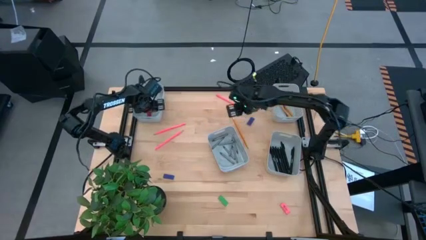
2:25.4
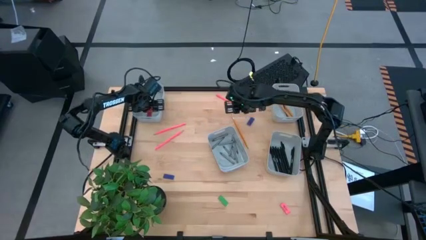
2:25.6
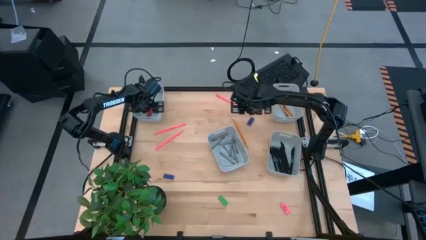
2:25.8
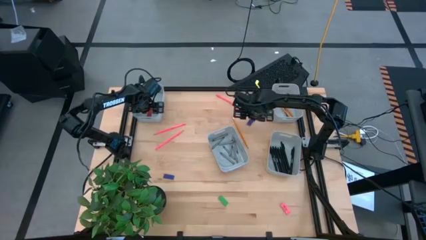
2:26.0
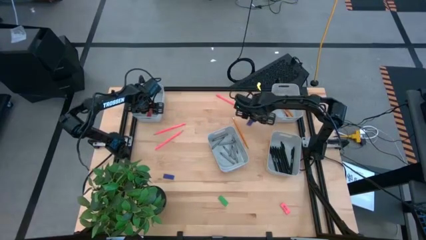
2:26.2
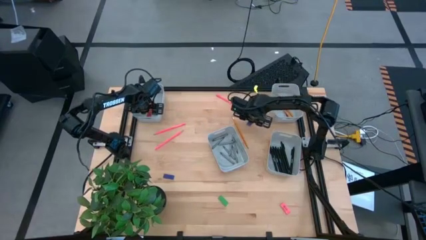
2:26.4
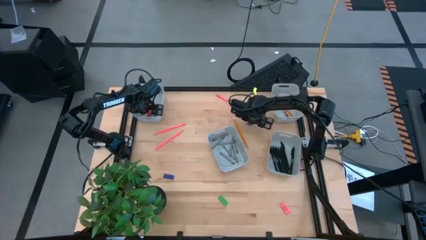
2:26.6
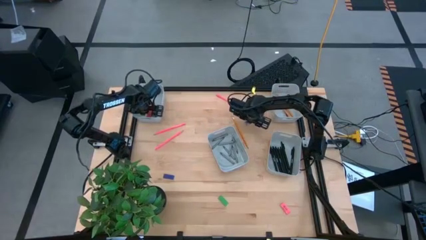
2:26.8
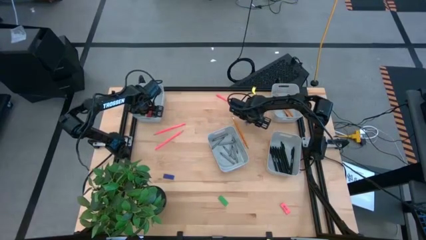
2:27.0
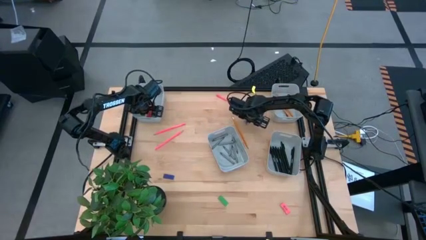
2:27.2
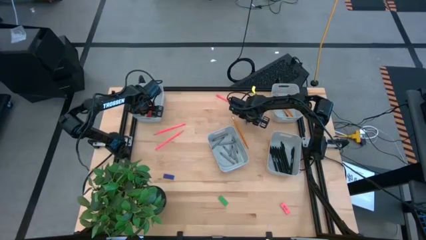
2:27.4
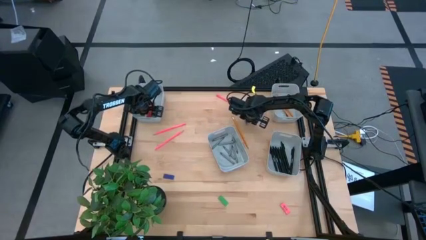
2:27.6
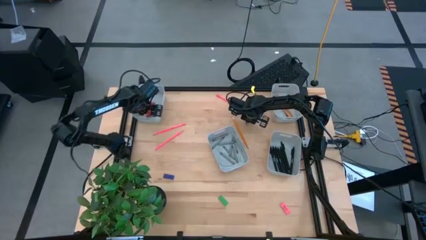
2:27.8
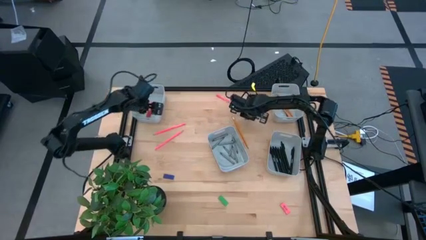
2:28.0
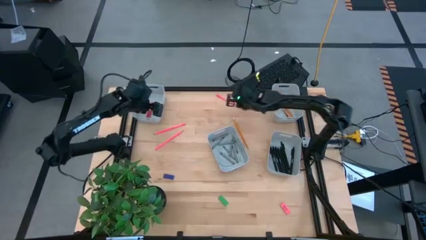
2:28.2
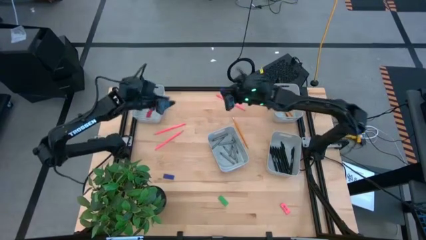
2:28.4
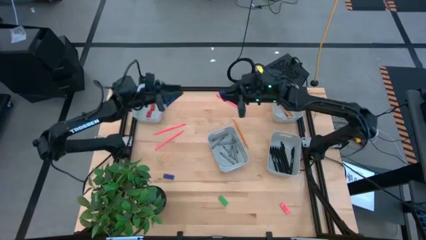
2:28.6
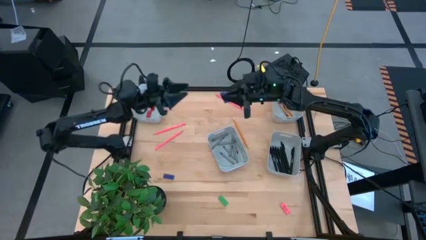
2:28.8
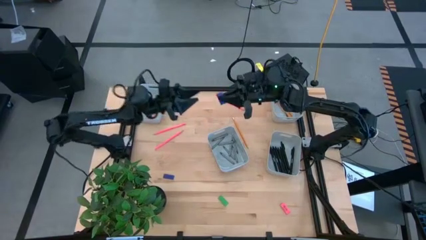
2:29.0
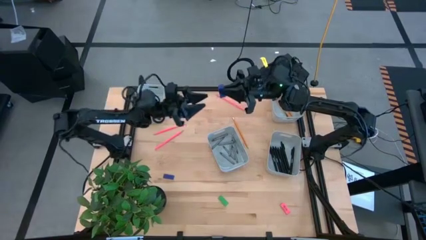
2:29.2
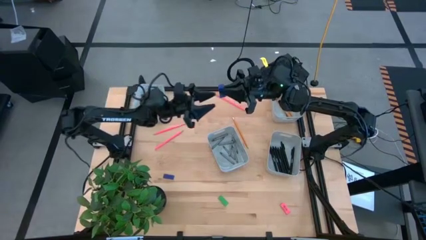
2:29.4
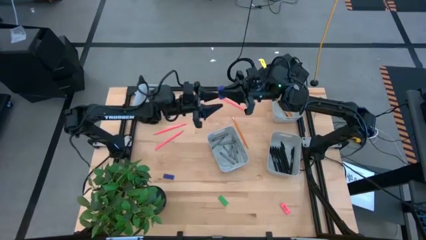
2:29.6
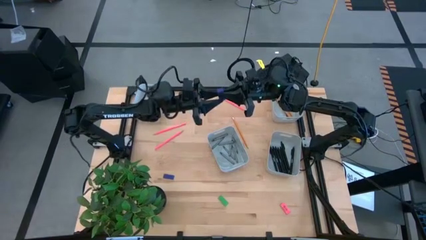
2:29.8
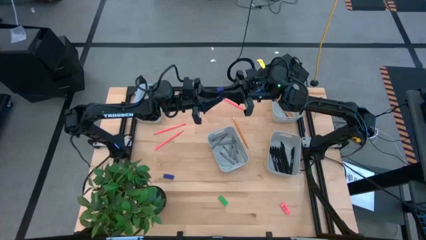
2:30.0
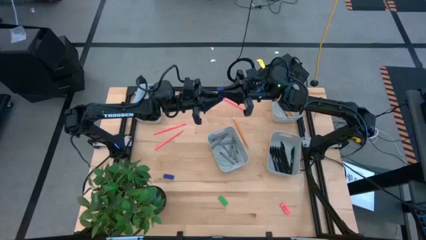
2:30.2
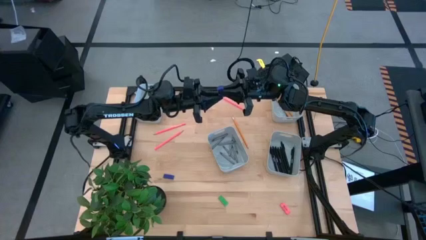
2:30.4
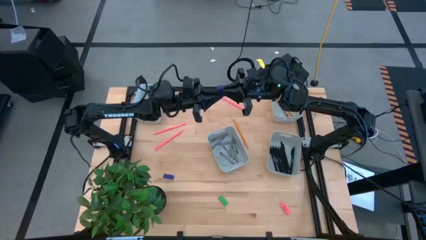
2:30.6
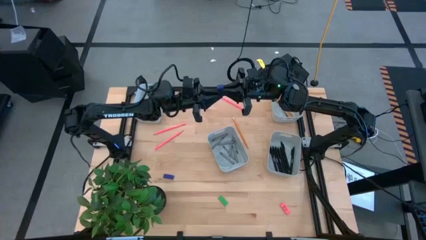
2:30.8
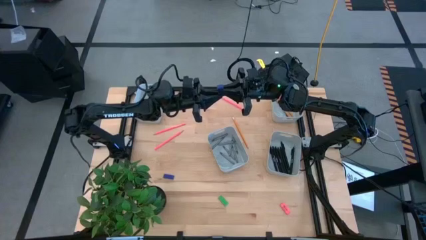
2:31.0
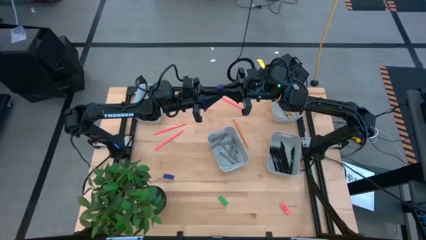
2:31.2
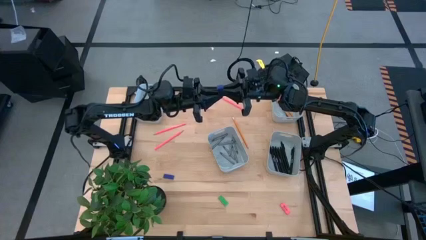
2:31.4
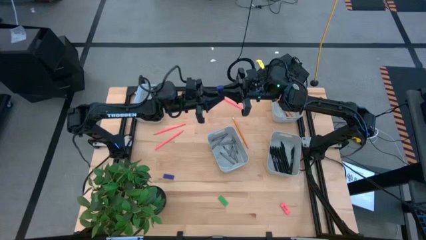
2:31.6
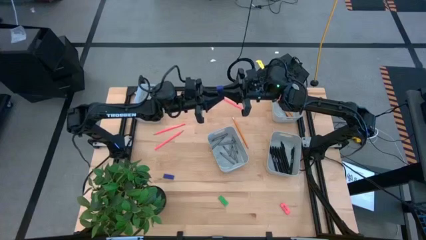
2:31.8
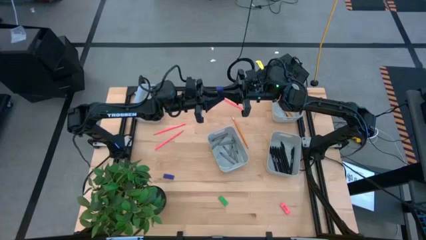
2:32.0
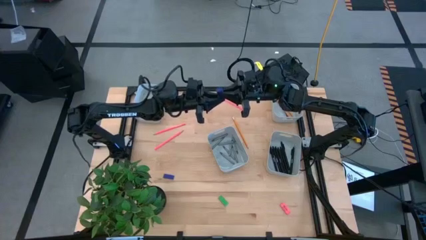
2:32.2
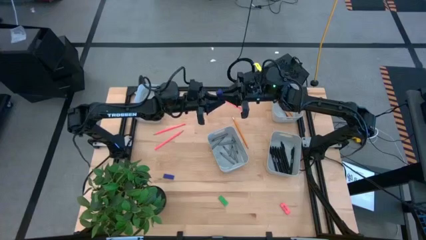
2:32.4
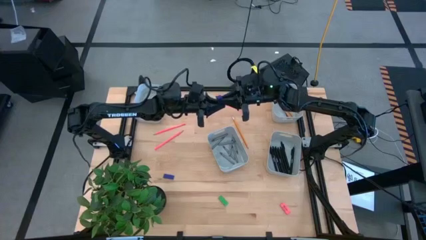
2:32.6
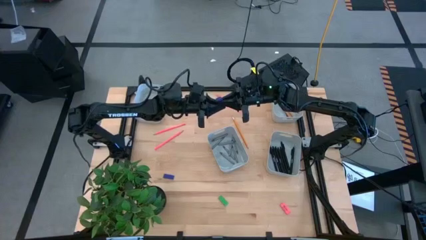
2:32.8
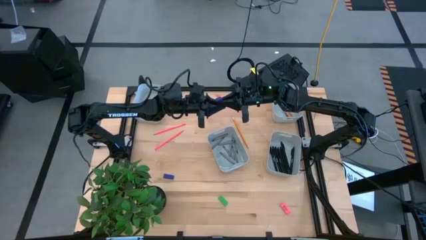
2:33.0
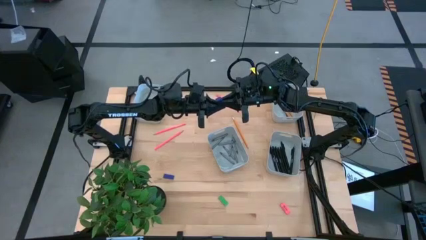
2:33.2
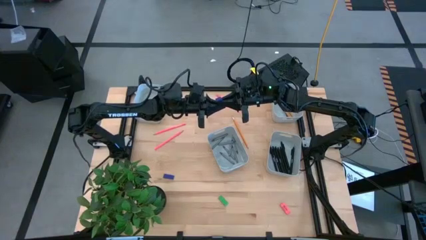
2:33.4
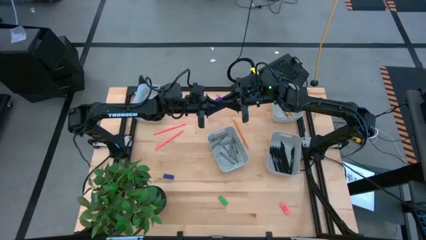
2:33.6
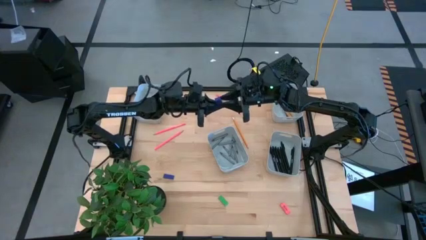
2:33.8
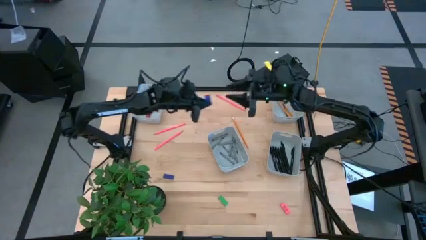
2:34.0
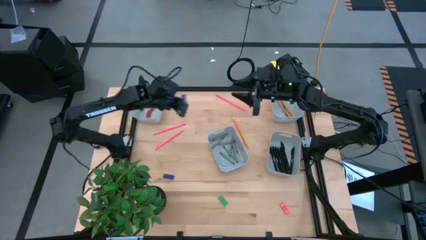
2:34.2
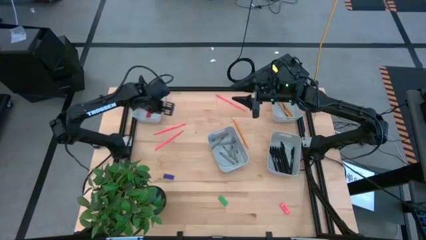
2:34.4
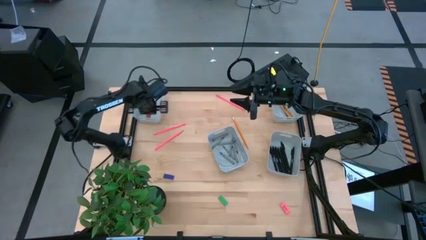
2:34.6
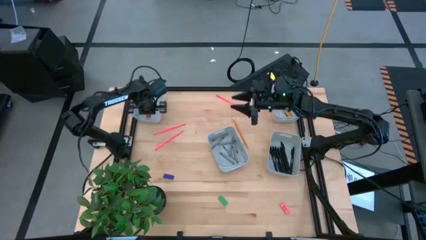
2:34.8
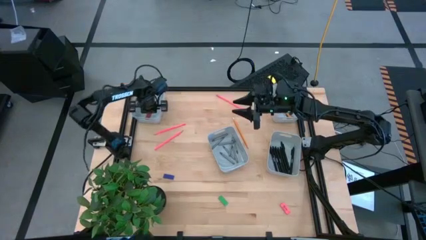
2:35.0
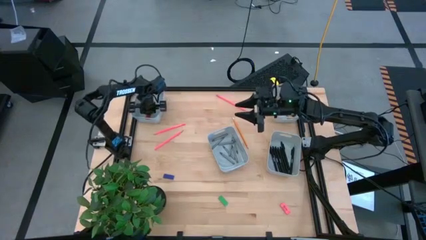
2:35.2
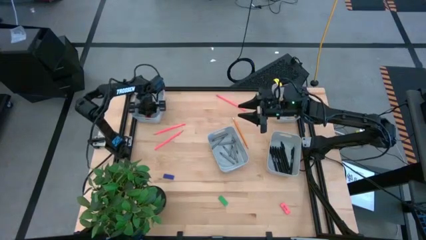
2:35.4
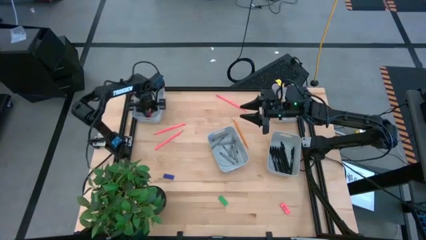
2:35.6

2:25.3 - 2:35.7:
Task: Sort crayons/erasers/pens/pencils in bins
Put the violet eraser into the top left gray bin

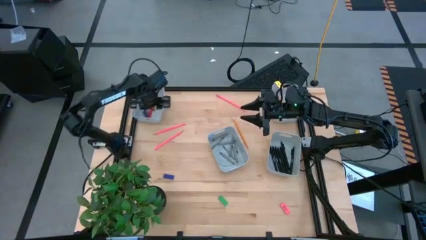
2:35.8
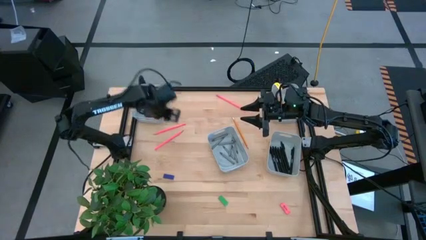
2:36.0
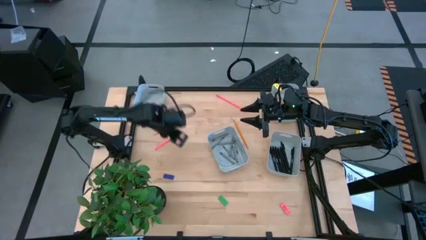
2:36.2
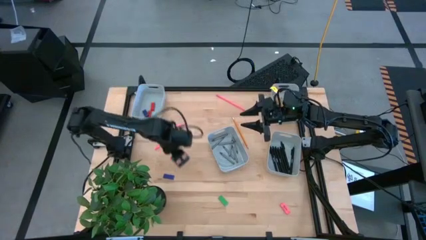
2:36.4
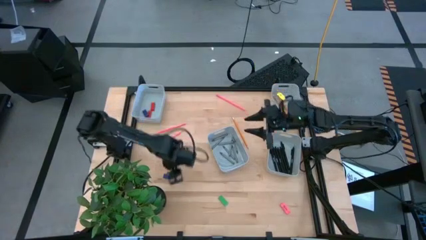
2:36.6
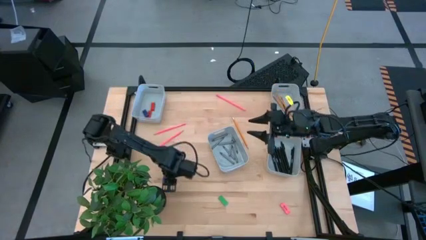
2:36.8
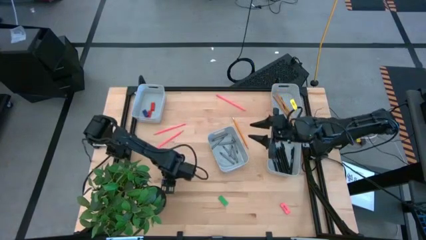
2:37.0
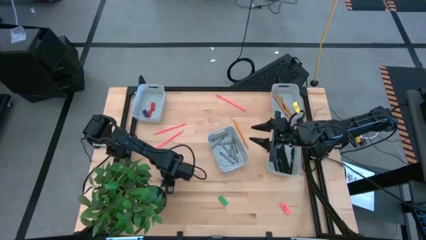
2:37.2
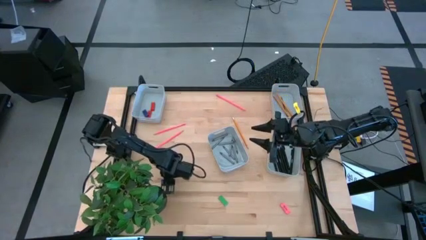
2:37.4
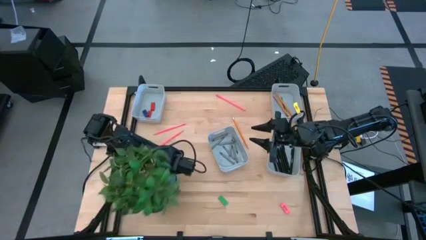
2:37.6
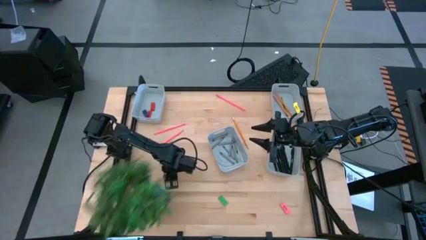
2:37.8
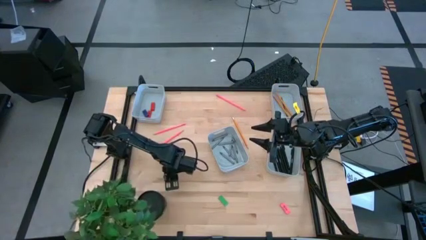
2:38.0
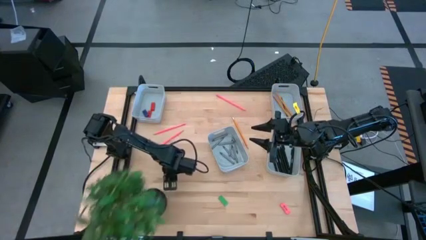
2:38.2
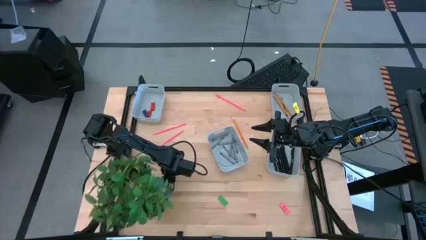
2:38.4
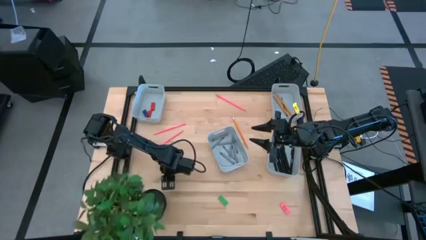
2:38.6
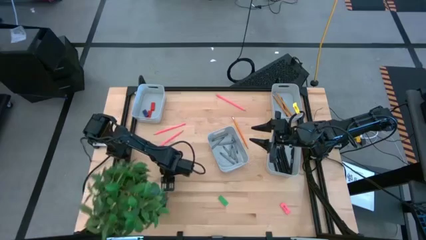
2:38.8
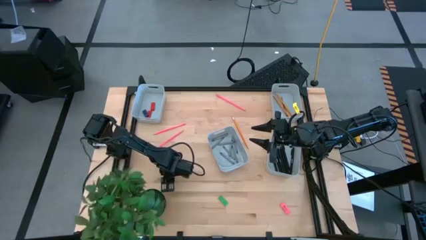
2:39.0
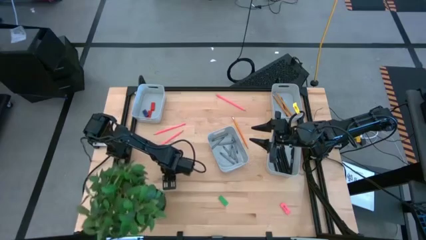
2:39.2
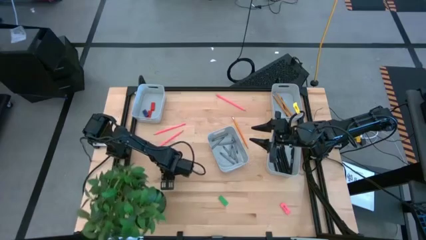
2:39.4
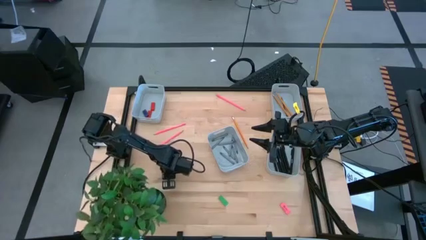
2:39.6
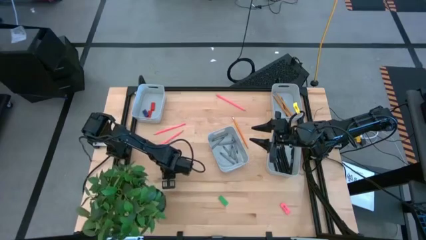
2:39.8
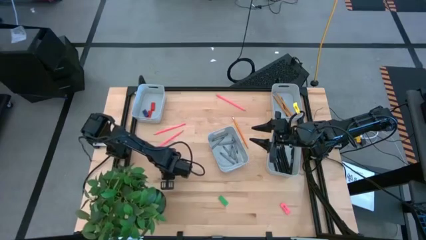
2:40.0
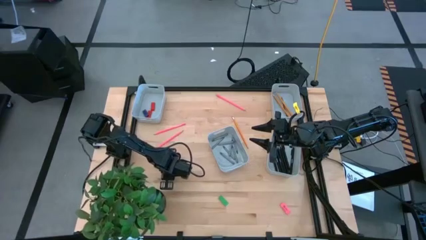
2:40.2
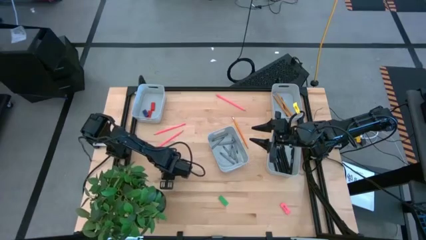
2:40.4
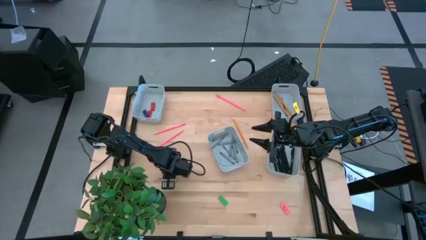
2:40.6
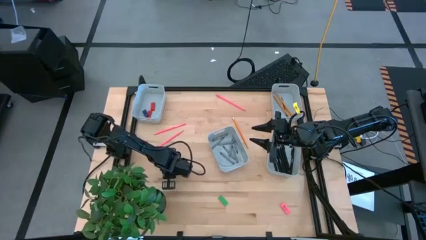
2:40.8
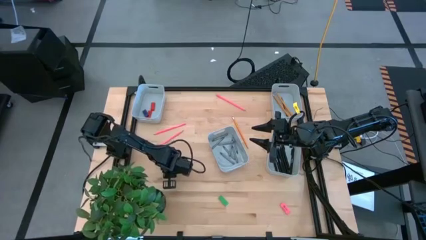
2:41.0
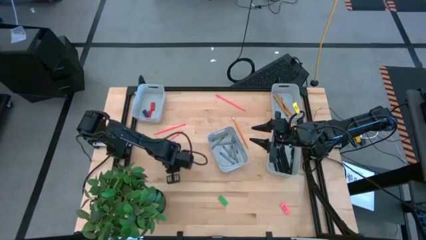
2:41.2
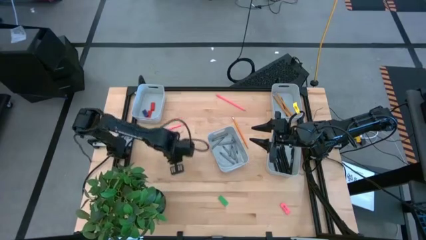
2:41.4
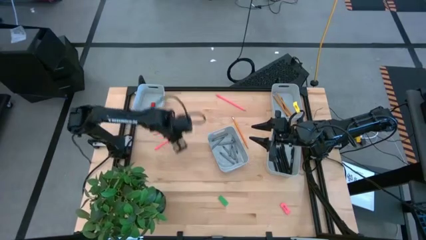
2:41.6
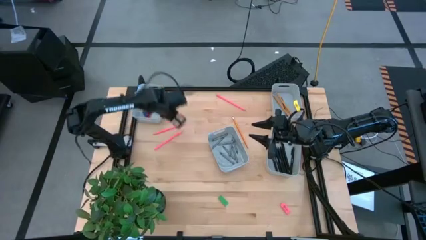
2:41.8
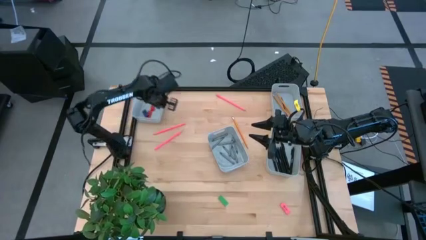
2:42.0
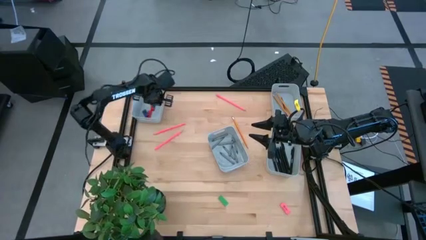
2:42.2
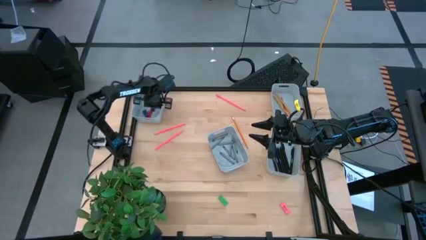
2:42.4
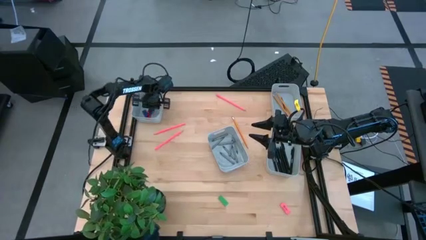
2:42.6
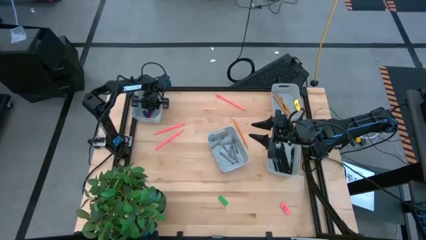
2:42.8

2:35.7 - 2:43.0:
Put the violet eraser into the top left gray bin
